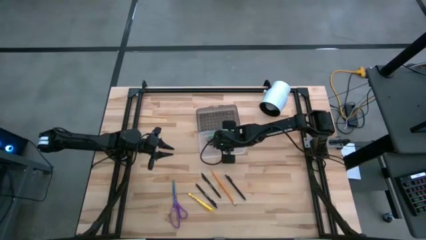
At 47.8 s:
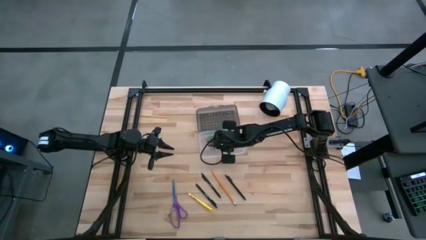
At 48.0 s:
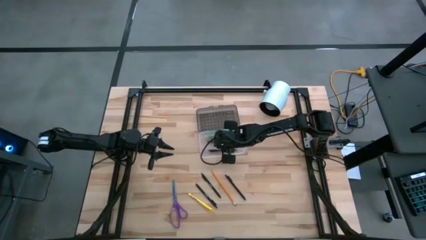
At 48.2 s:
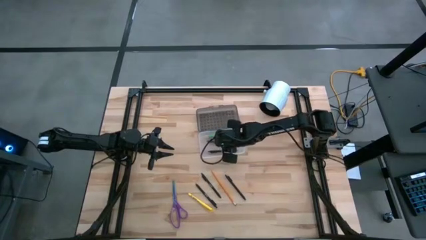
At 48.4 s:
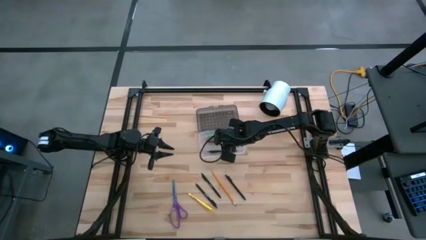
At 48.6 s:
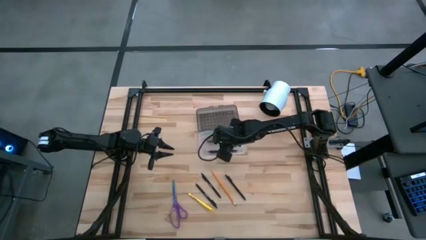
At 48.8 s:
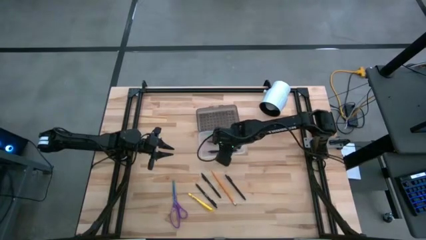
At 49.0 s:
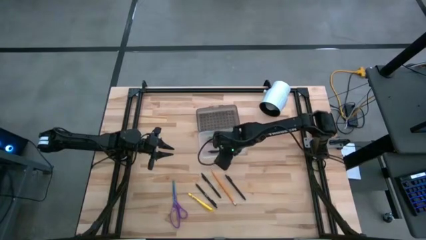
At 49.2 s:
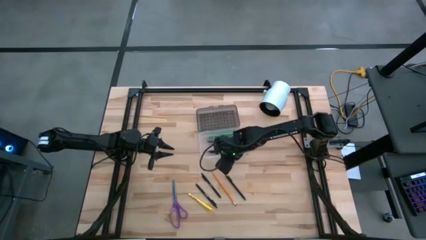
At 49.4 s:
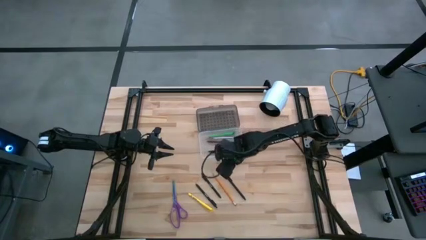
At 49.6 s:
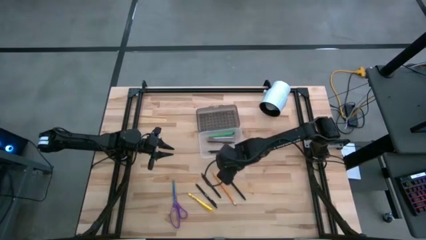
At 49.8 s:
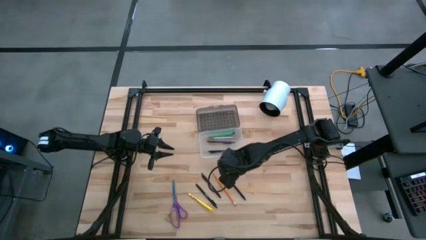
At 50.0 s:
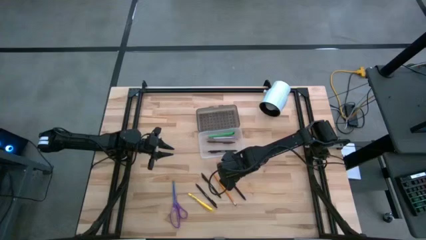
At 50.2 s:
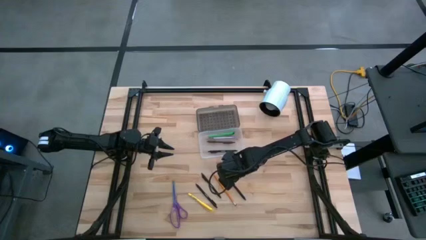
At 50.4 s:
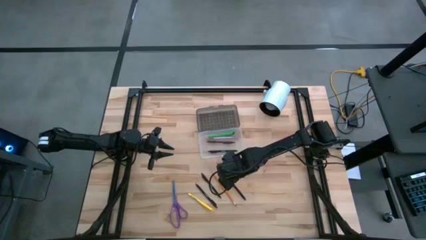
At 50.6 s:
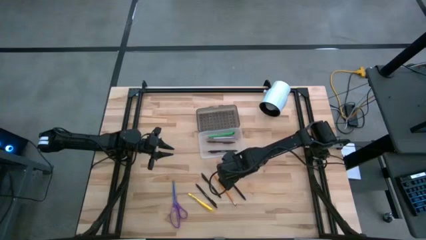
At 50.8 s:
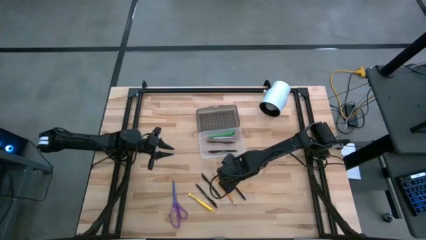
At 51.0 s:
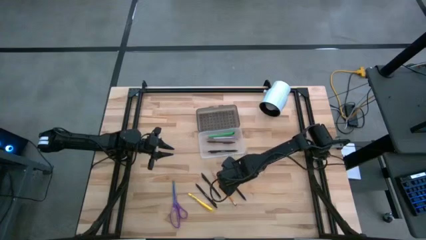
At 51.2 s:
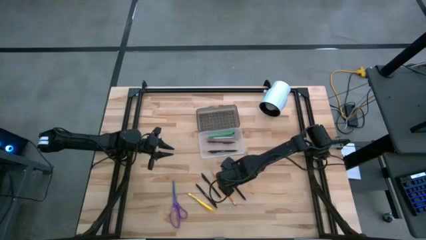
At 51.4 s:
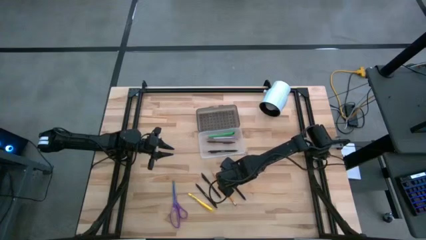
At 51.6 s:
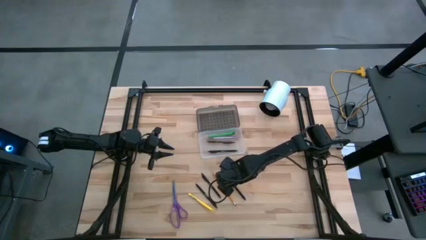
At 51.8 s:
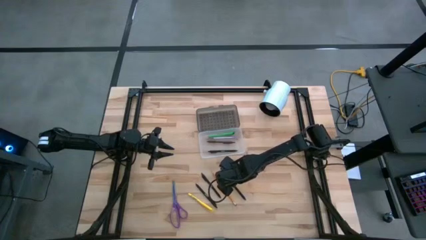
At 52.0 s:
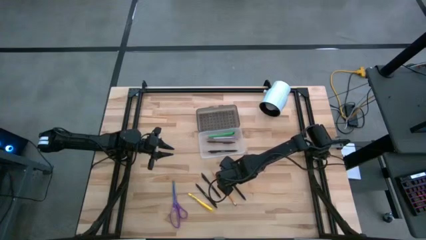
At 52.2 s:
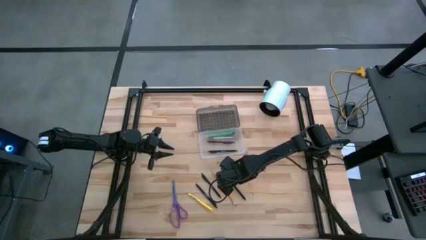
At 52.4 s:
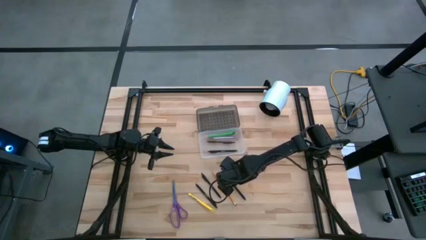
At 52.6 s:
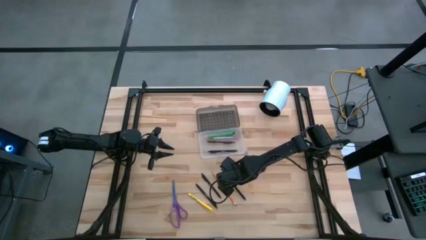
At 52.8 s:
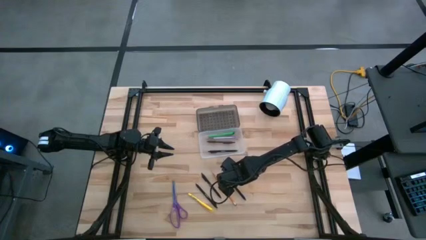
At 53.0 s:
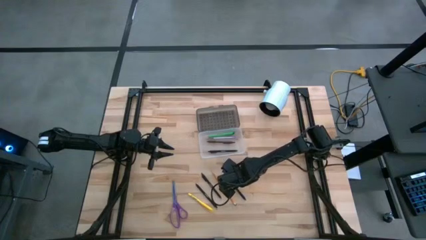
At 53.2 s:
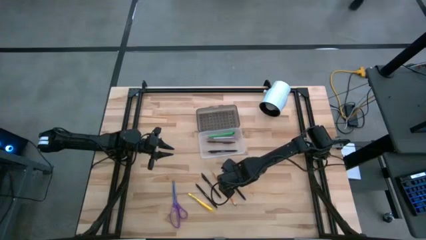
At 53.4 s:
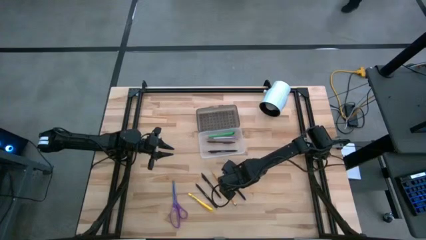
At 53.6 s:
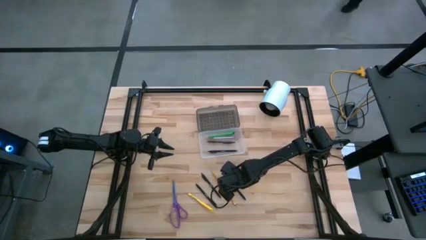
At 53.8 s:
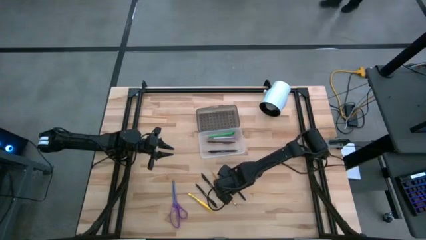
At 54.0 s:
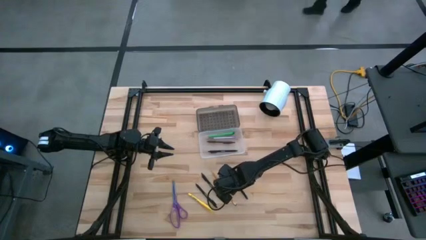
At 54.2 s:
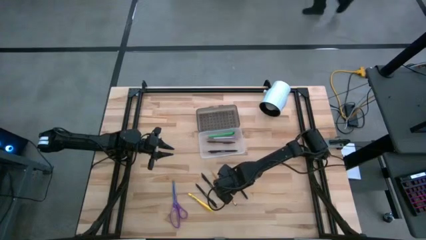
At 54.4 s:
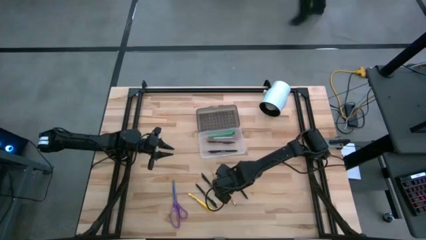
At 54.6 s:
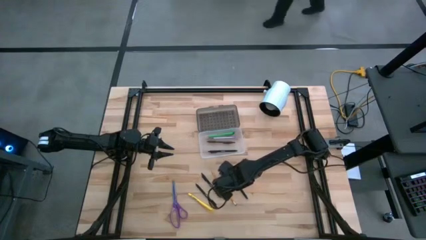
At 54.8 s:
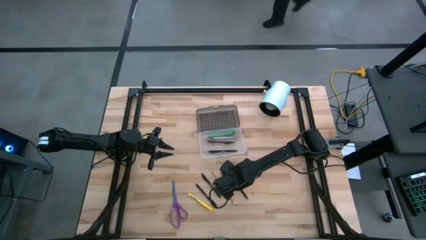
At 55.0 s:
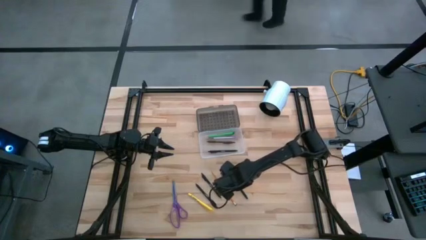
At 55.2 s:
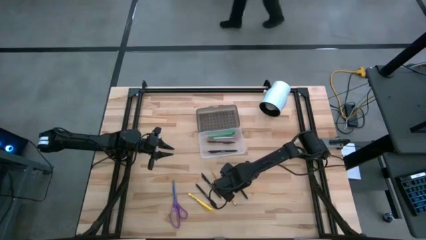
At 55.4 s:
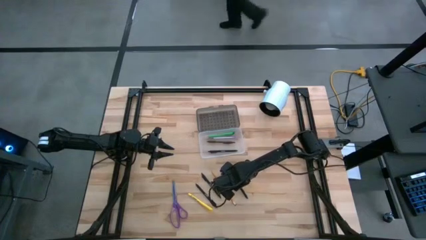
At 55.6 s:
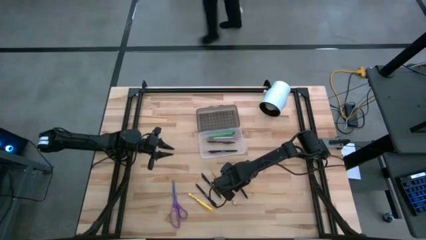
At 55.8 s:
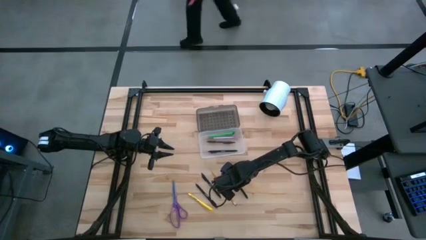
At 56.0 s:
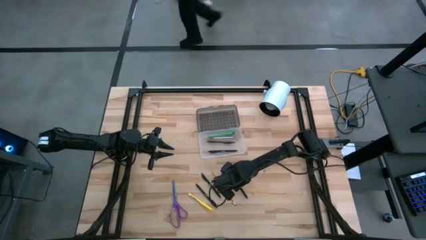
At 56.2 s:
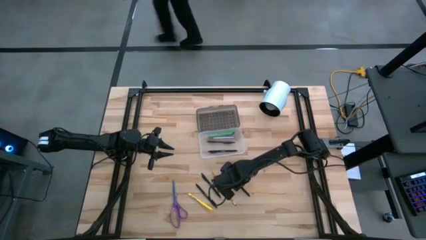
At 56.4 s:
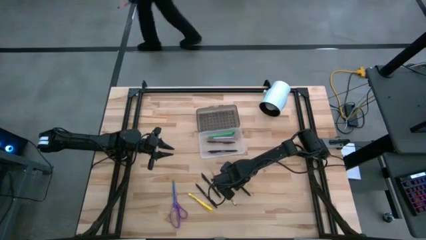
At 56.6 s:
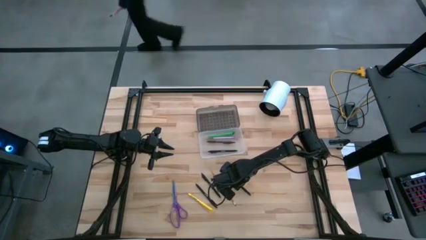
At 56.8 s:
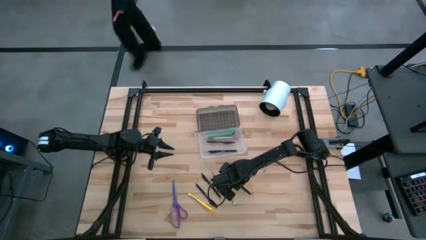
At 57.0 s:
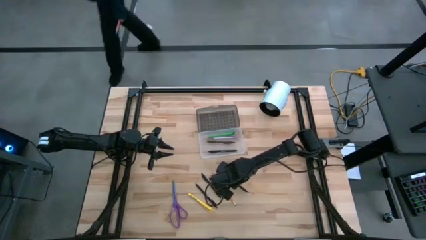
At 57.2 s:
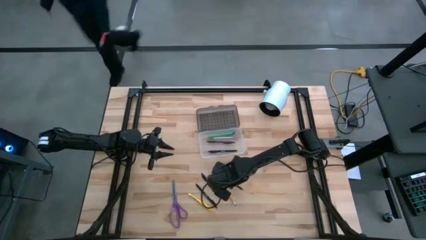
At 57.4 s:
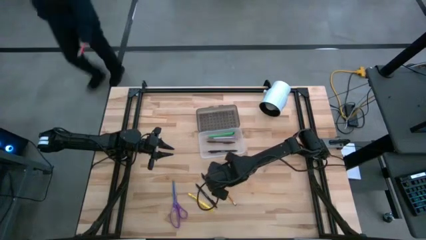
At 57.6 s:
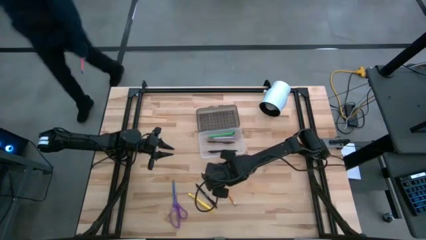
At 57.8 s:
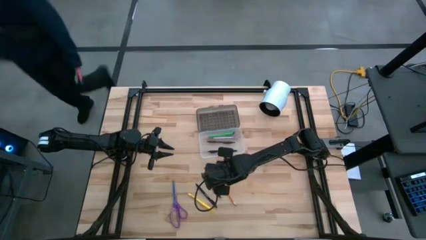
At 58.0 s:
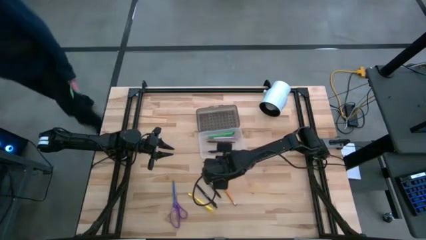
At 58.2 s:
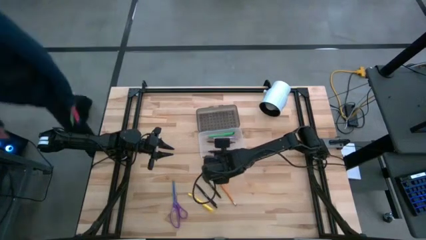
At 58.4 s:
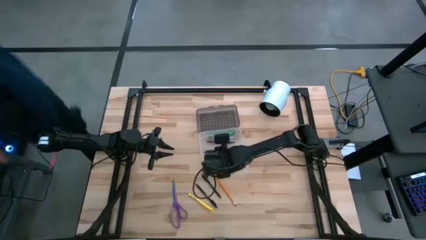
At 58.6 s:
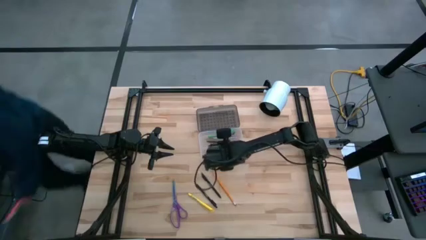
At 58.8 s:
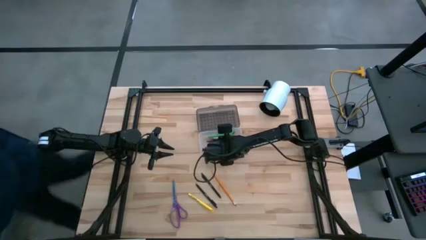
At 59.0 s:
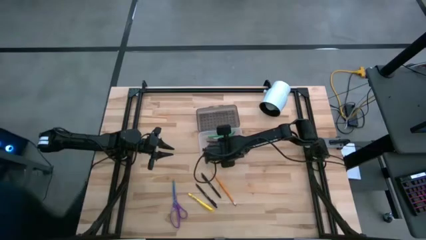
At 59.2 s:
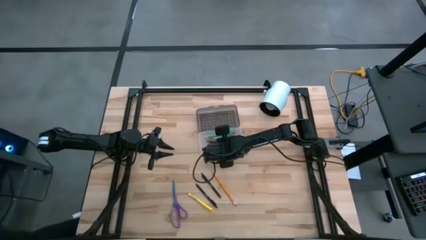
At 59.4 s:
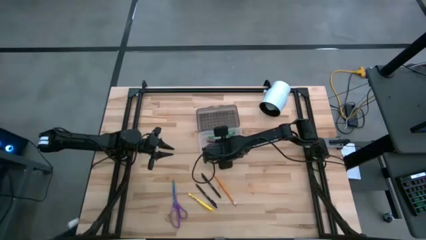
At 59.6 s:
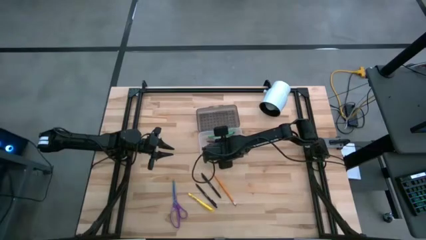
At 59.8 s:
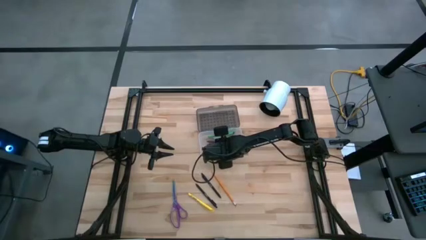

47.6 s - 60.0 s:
Task: Pick & place school supplies into a supply box
Put the black pen into the transparent supply box
